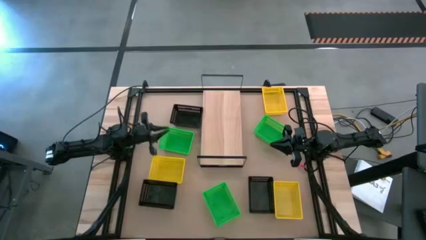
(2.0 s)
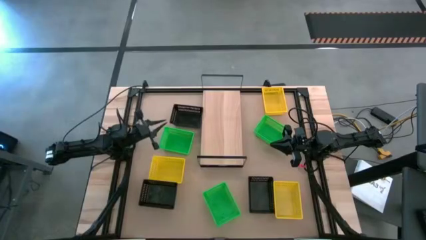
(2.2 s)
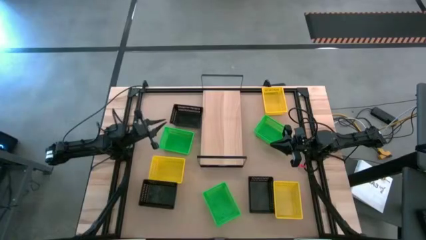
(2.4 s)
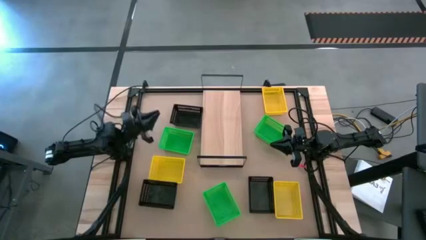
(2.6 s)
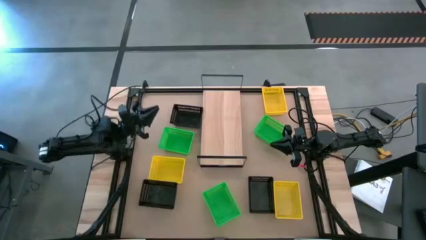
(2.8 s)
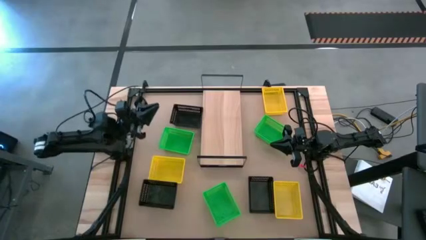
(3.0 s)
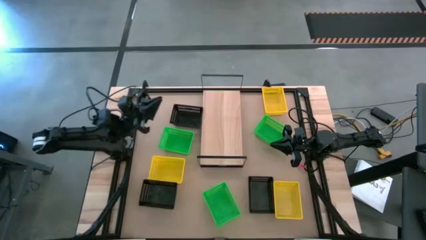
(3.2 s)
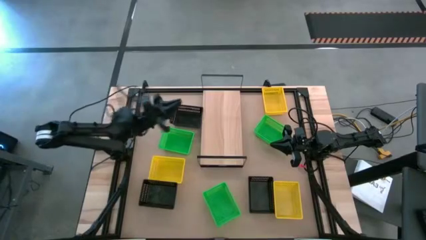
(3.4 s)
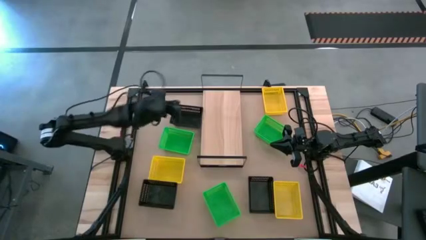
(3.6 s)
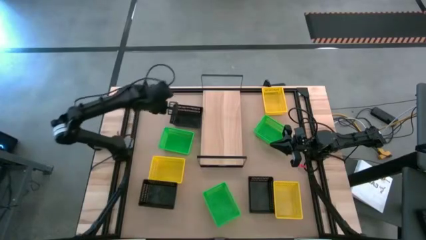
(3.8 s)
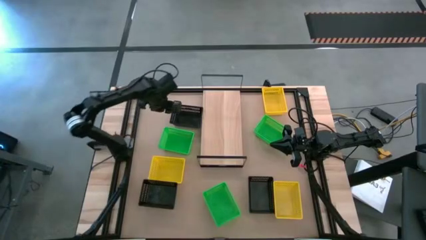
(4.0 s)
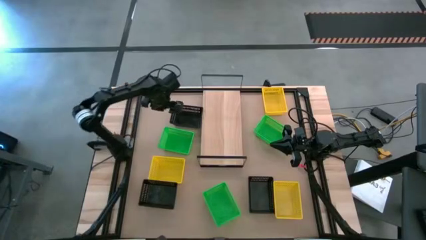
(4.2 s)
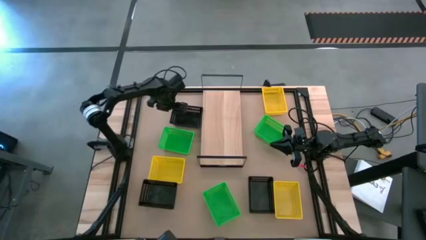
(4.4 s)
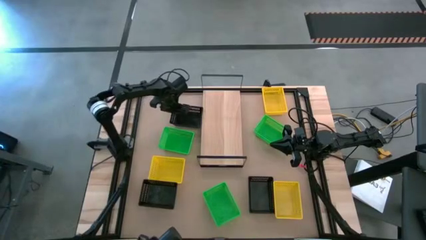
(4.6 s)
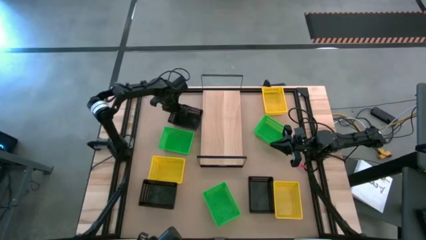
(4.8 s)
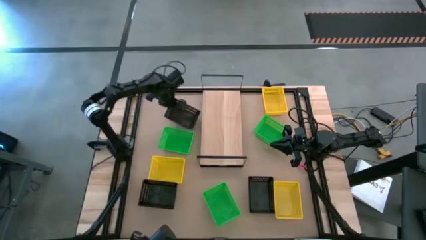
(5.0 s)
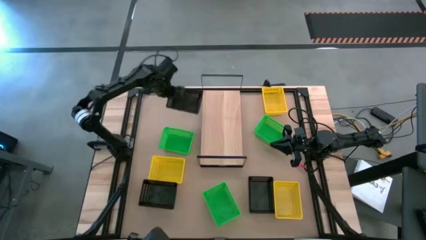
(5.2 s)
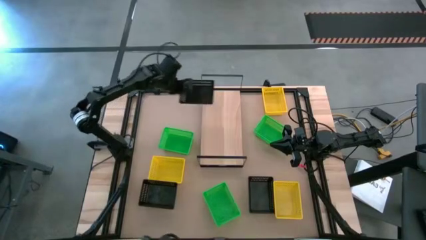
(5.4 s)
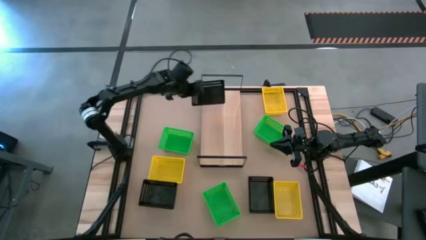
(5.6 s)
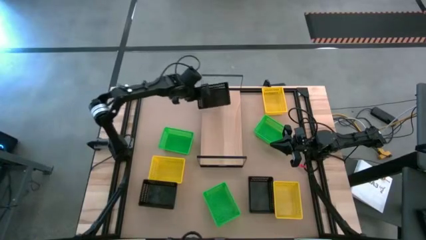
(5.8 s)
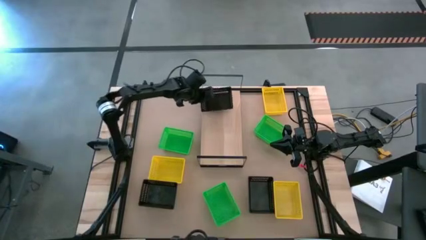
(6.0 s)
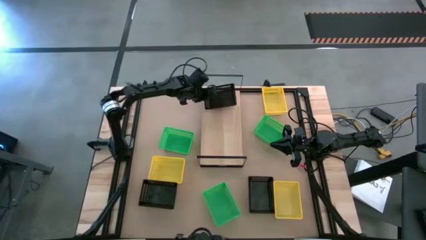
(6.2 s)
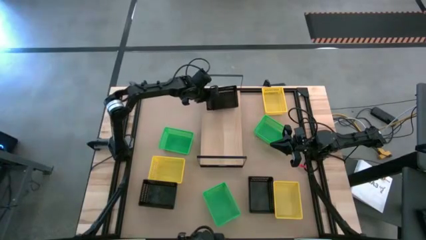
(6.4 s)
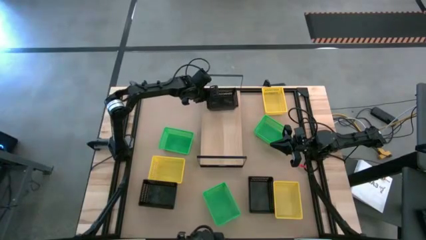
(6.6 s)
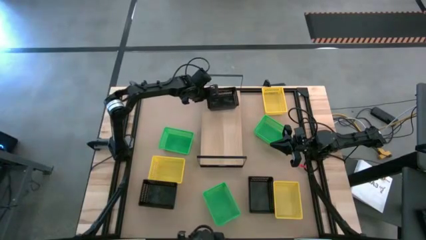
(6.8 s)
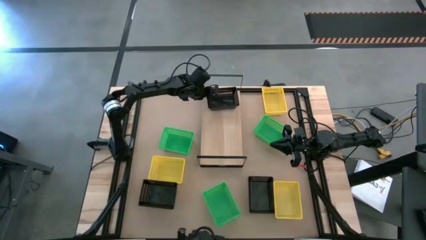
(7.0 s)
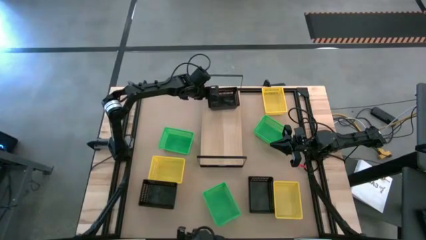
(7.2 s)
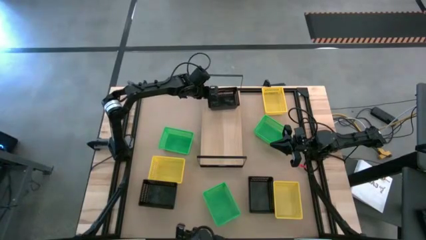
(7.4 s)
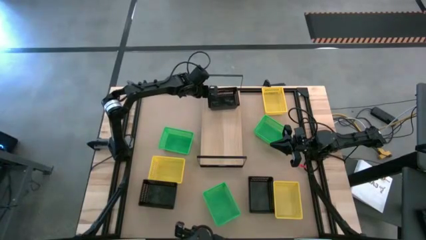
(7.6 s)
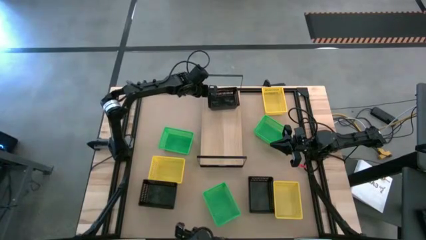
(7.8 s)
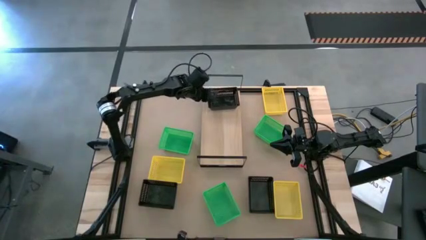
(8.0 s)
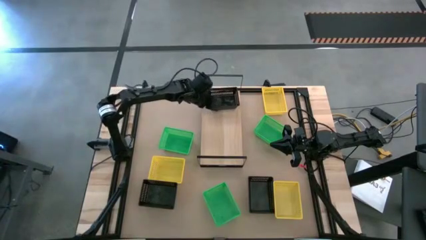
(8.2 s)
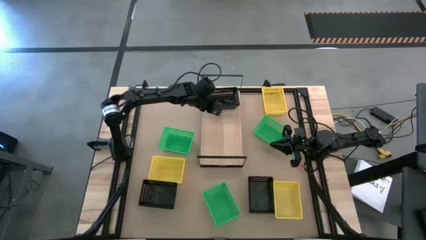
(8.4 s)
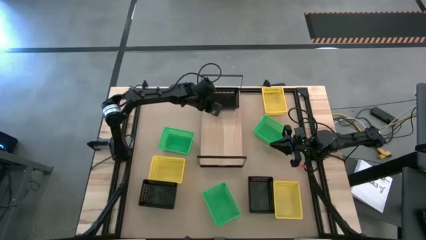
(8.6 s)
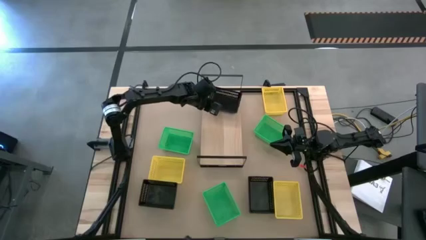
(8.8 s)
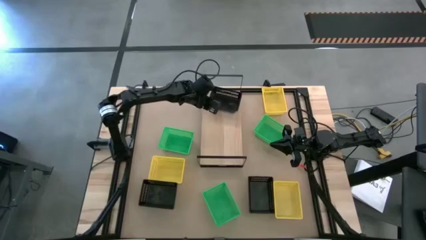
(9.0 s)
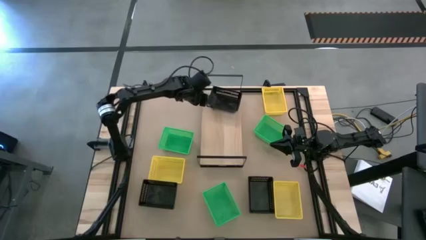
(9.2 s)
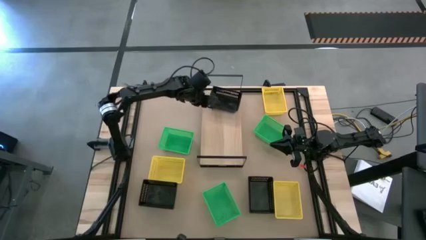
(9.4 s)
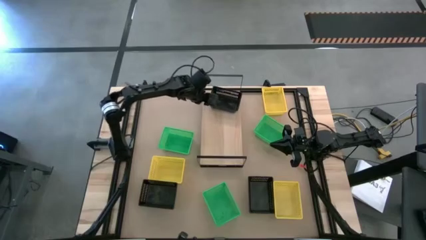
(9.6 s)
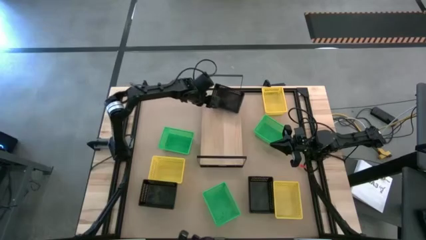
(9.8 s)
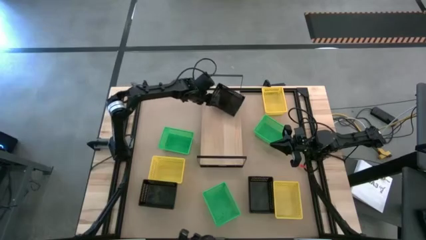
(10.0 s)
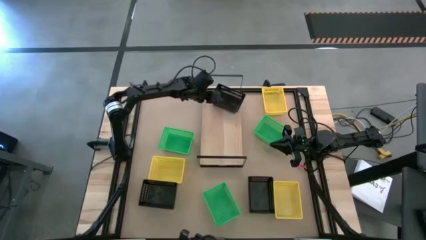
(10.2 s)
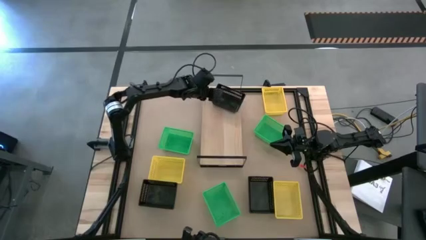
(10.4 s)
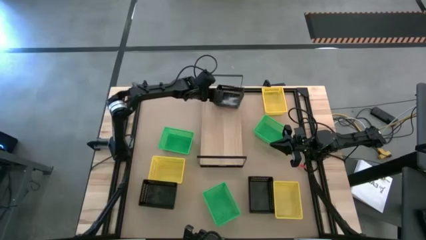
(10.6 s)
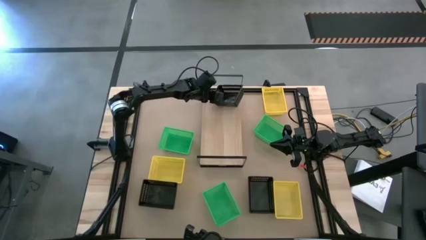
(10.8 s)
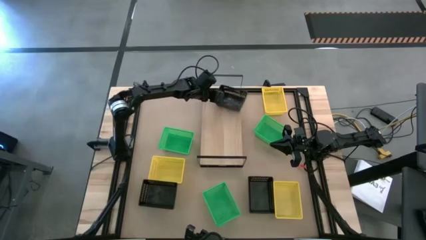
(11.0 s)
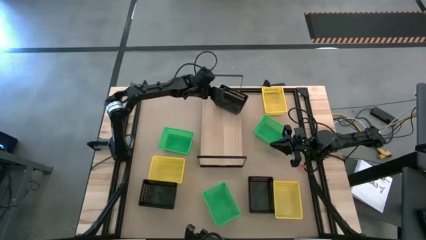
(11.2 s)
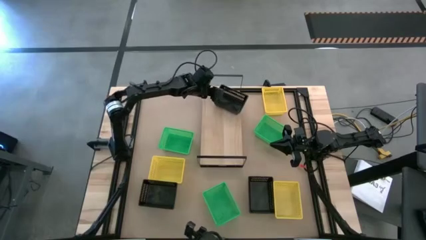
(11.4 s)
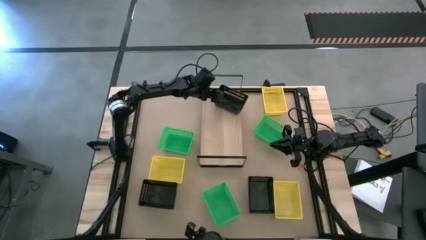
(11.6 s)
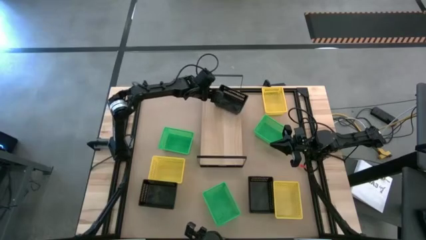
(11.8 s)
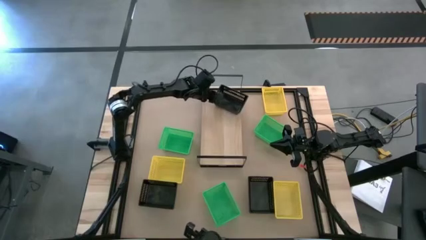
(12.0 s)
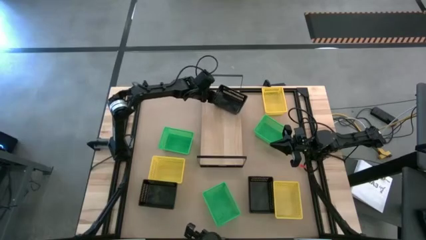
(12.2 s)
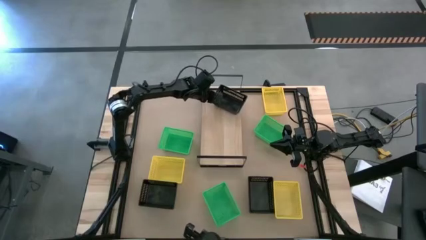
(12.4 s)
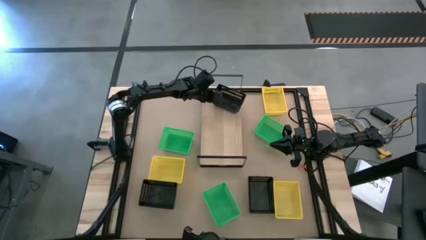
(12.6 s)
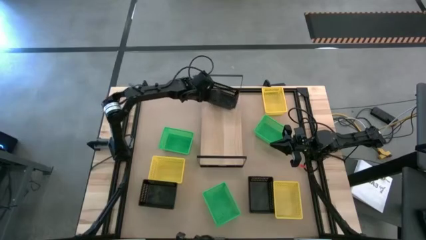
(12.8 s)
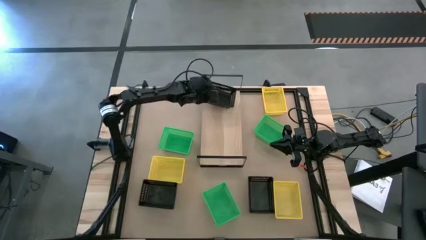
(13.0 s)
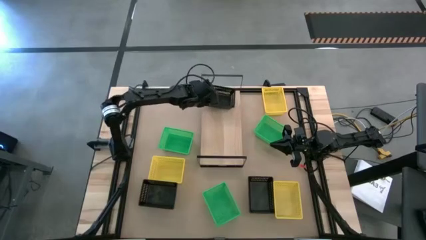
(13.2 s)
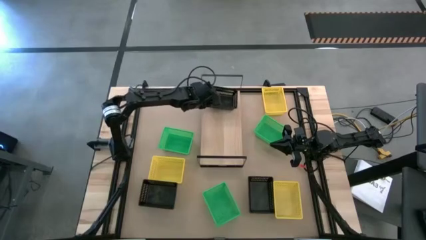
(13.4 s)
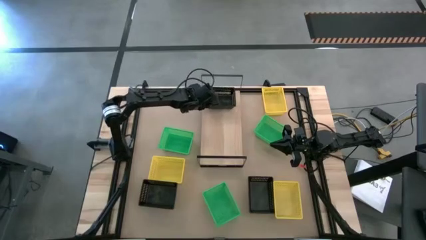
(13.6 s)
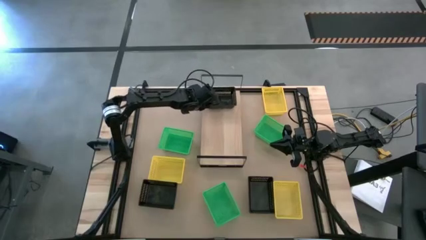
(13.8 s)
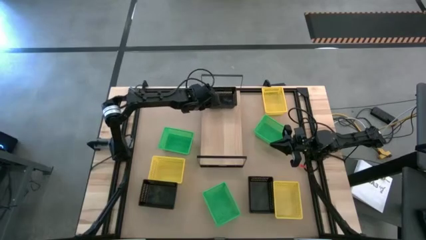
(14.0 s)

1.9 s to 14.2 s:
Task: Stack baskets on shelf by color
Put the top black bin on the shelf

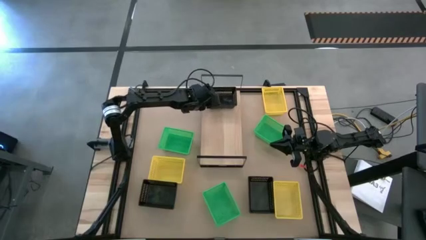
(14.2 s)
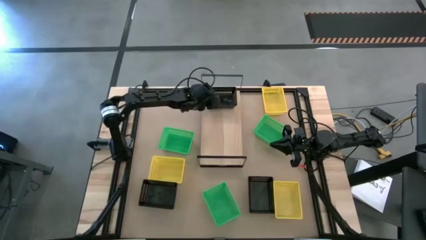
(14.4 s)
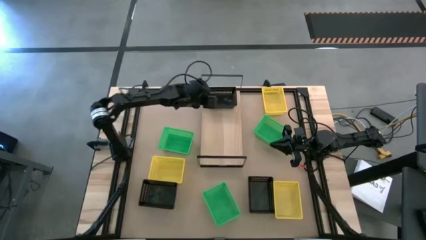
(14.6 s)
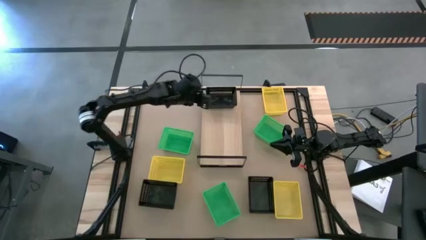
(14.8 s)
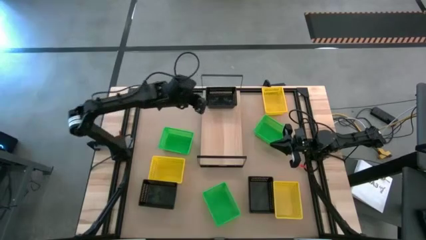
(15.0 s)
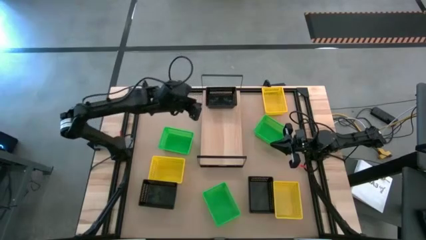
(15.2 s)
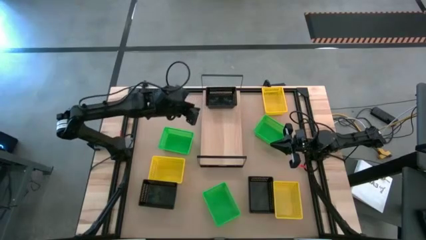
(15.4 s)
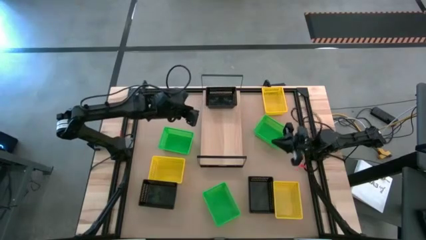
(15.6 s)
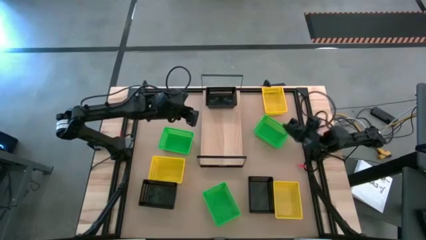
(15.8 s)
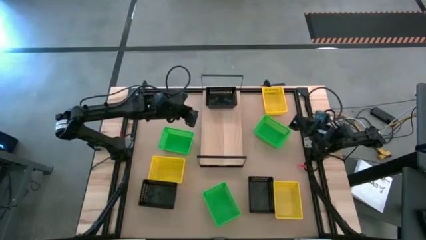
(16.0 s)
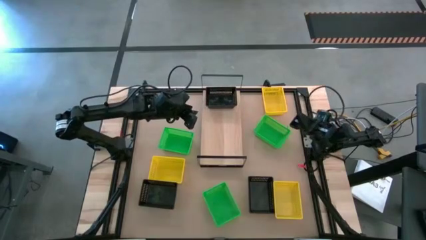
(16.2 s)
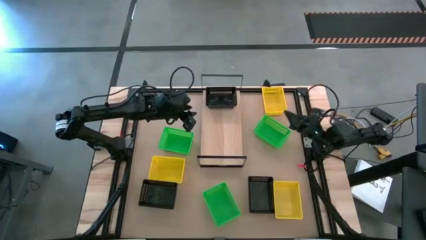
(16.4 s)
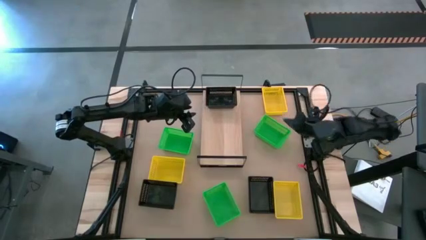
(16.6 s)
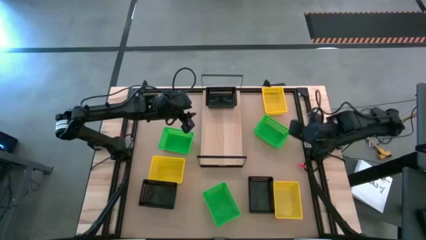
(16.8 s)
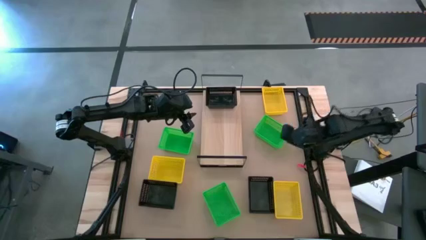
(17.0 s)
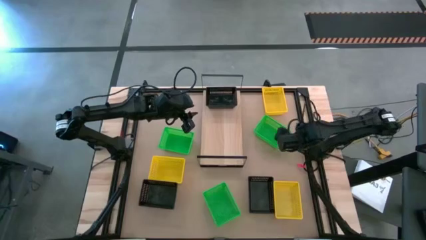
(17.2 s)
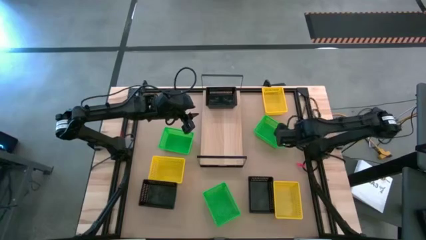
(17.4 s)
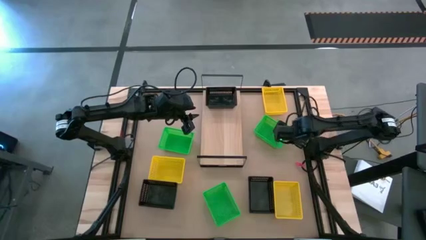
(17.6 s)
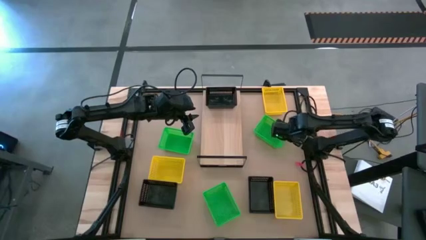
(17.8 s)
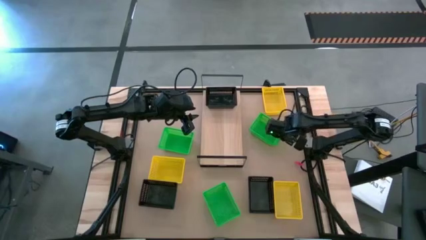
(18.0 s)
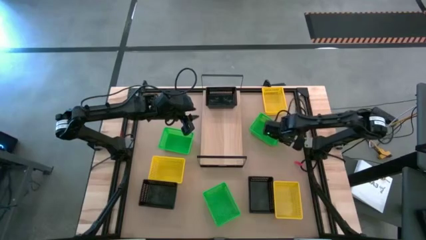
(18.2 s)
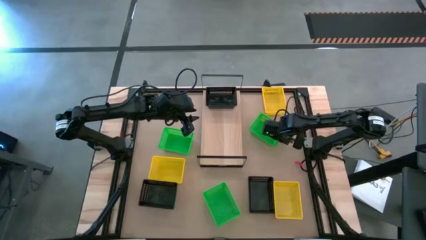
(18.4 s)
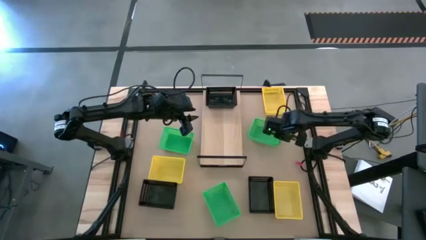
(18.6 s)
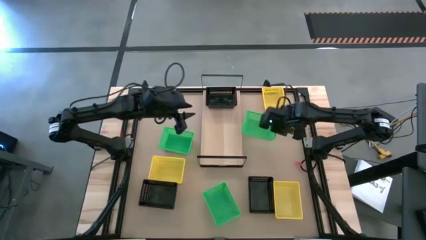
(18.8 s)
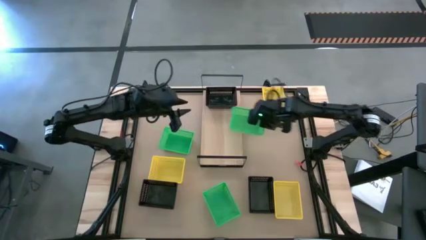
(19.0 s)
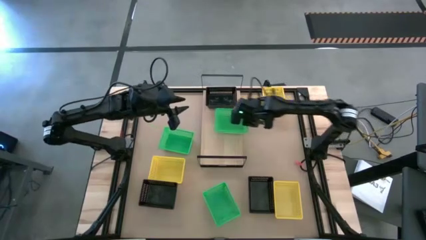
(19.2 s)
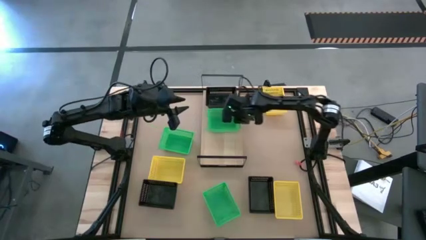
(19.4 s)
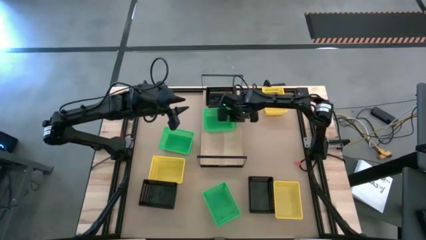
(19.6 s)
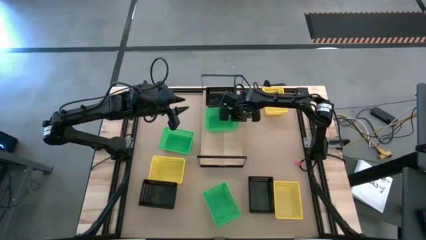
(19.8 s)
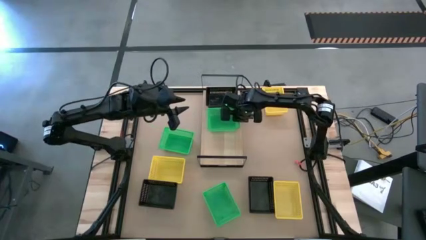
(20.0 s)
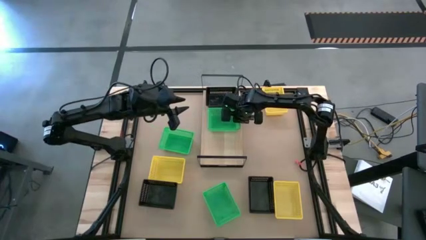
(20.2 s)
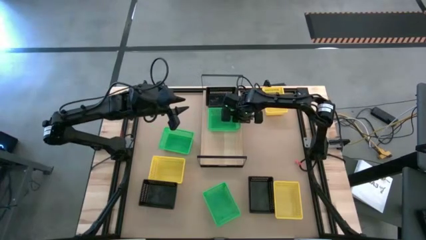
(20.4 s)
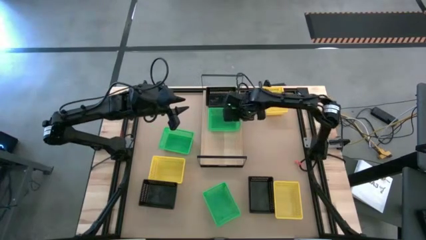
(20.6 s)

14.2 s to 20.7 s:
Put the top right green bin on the shelf
